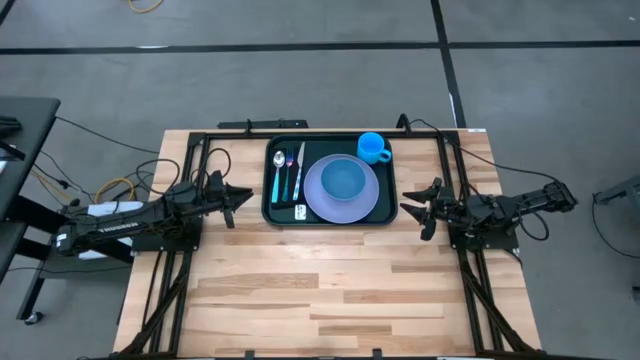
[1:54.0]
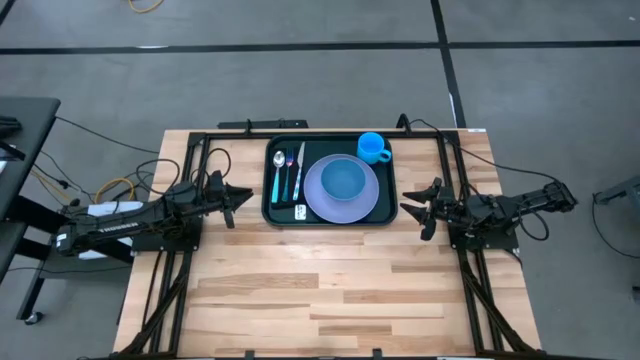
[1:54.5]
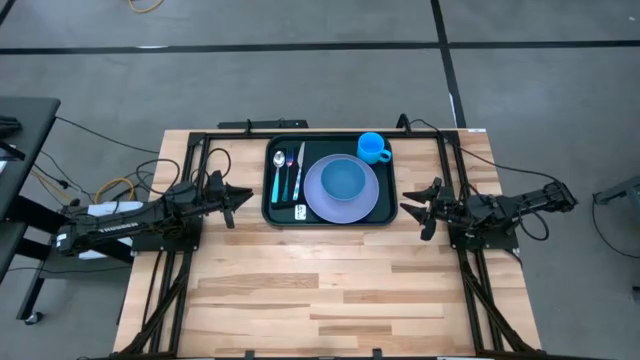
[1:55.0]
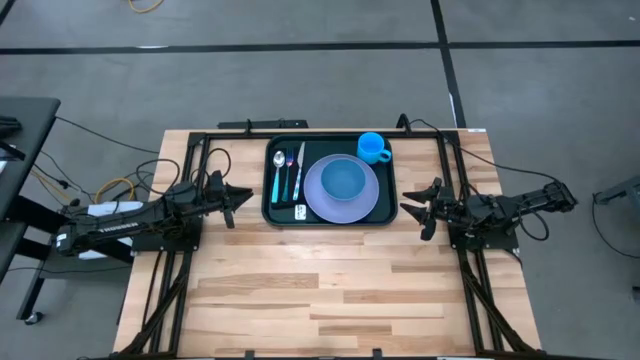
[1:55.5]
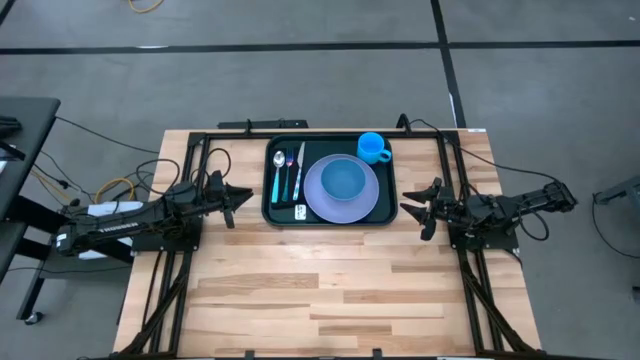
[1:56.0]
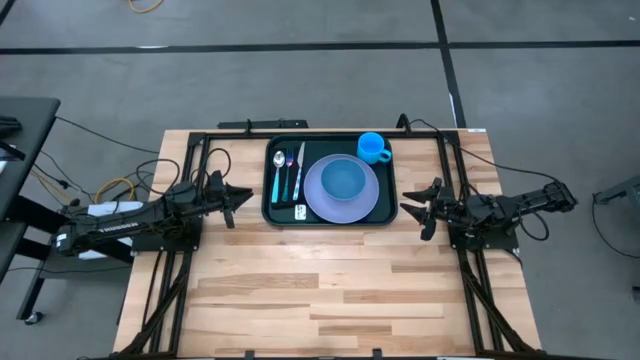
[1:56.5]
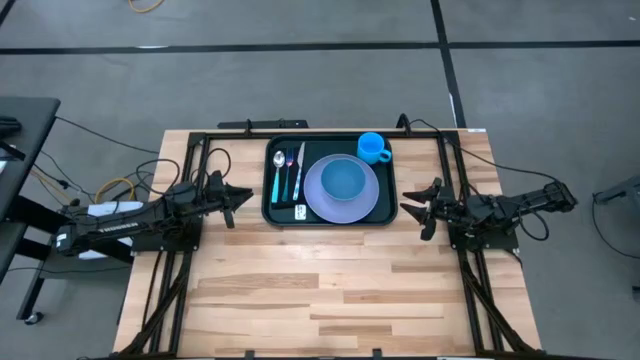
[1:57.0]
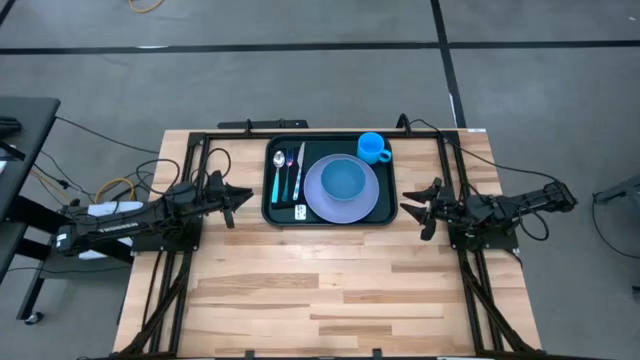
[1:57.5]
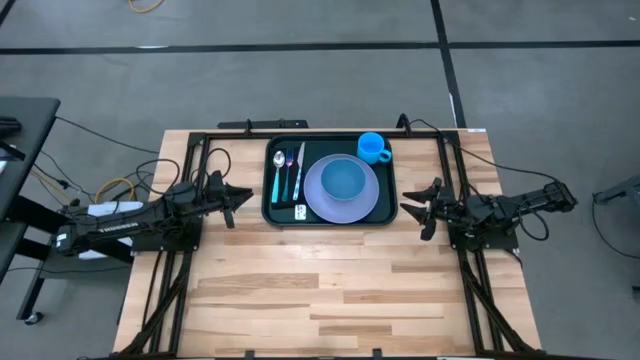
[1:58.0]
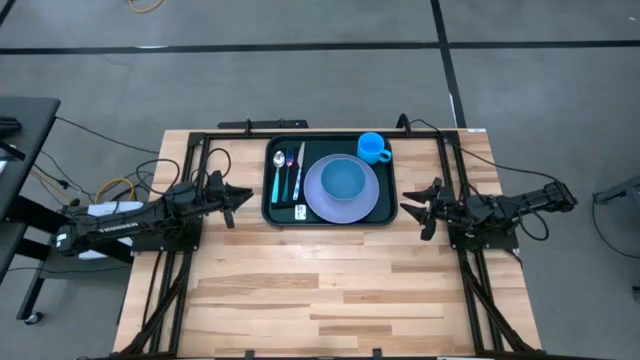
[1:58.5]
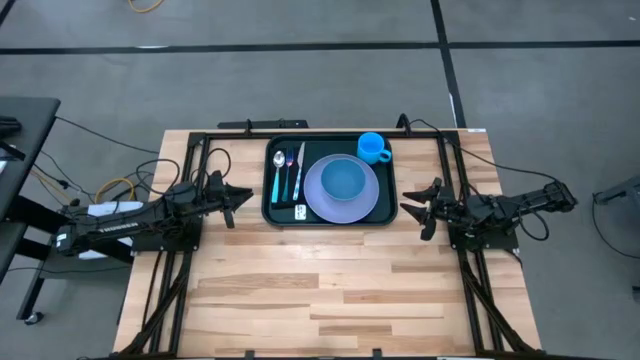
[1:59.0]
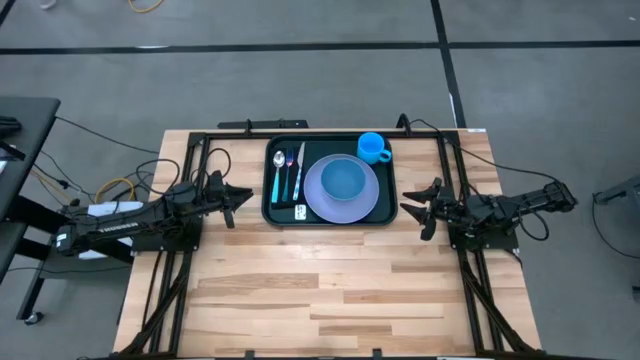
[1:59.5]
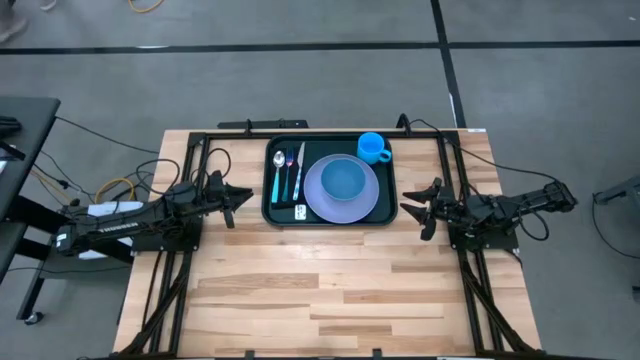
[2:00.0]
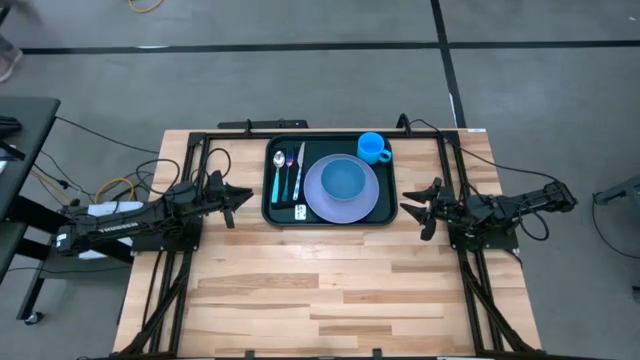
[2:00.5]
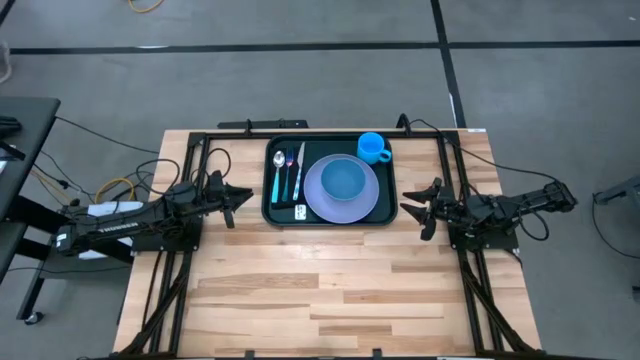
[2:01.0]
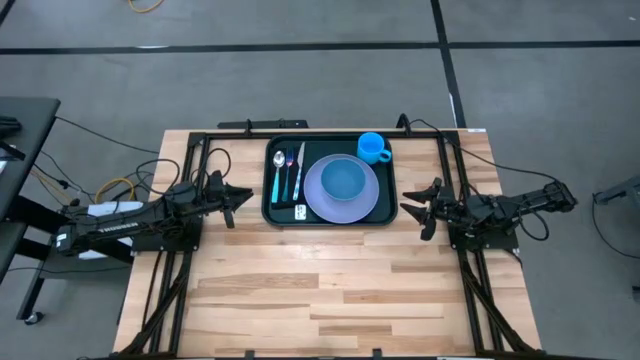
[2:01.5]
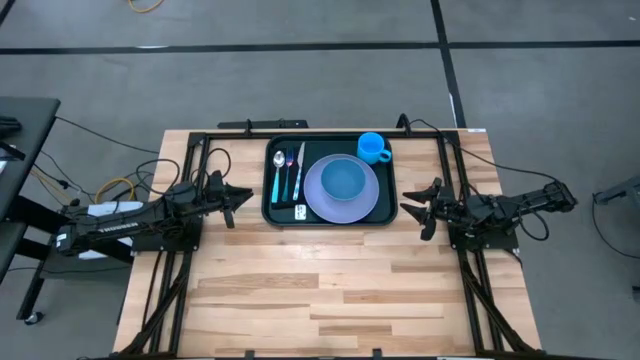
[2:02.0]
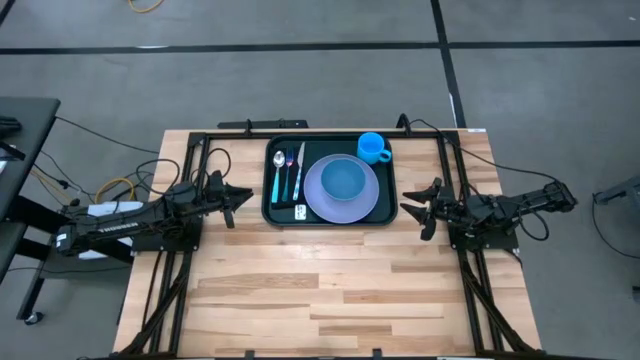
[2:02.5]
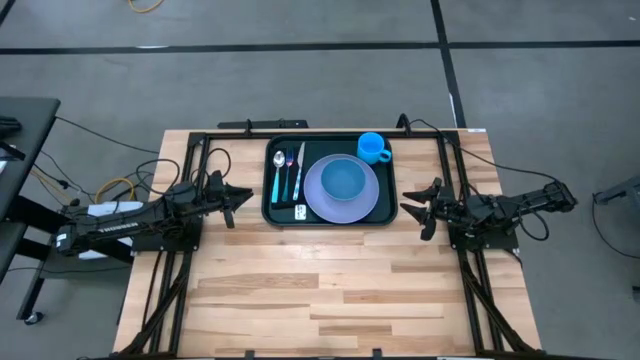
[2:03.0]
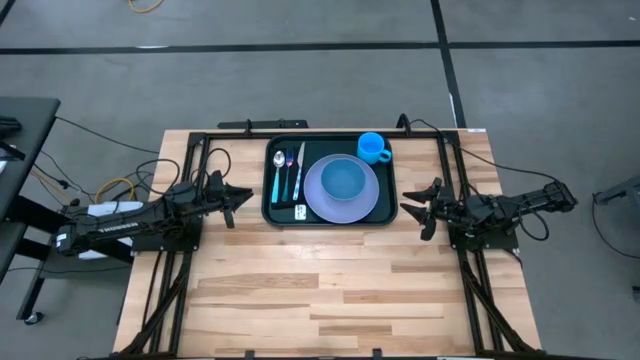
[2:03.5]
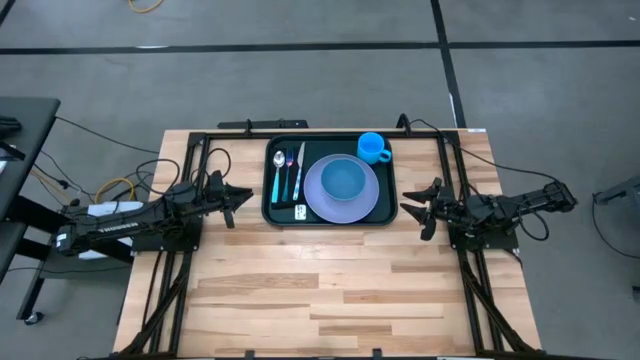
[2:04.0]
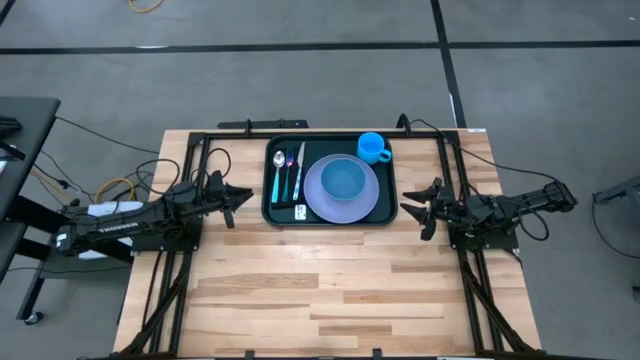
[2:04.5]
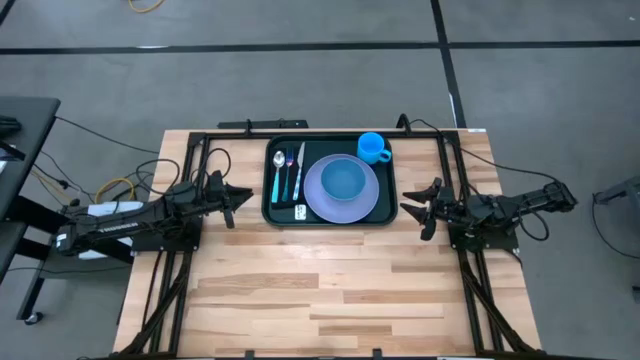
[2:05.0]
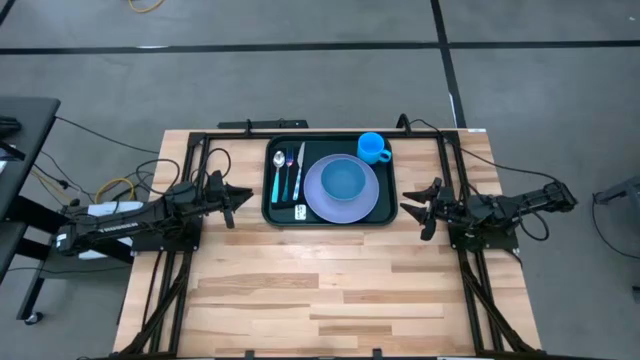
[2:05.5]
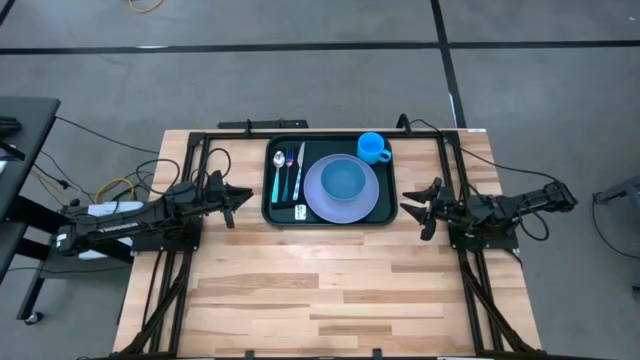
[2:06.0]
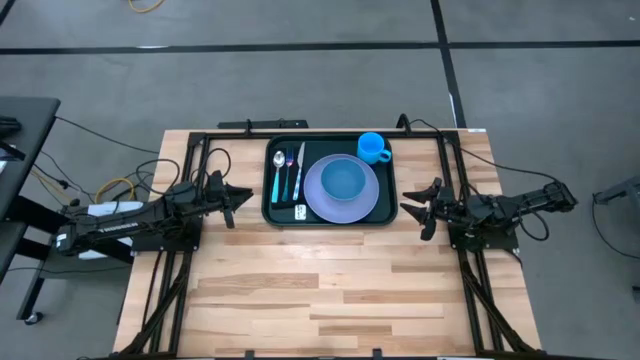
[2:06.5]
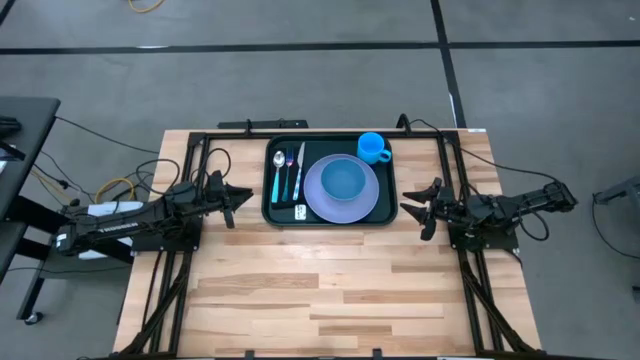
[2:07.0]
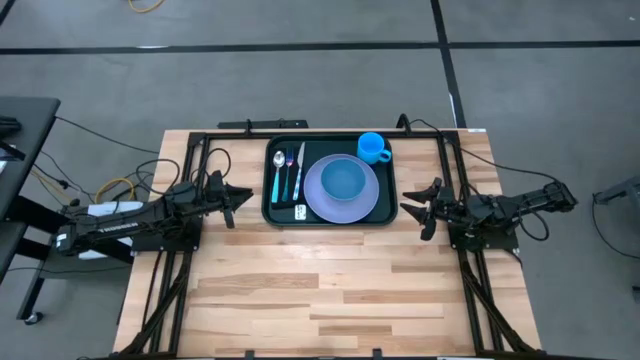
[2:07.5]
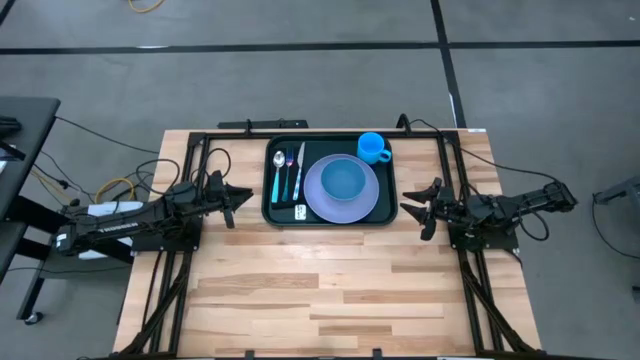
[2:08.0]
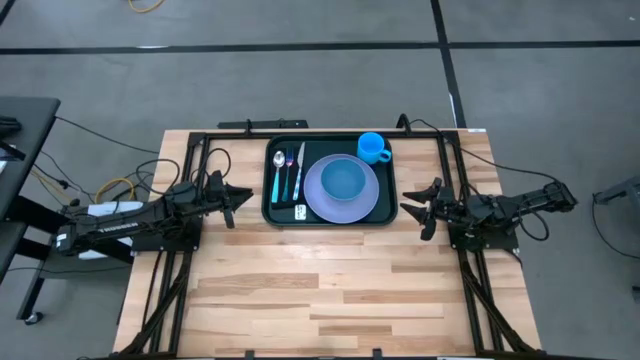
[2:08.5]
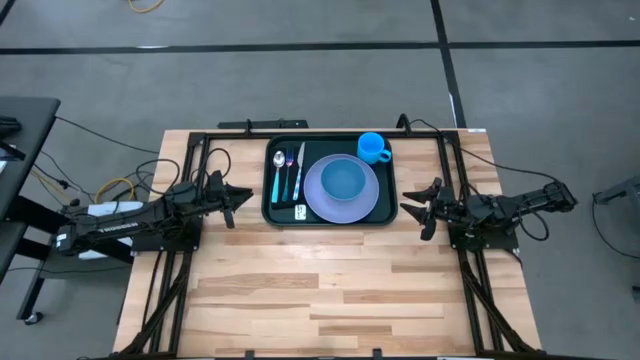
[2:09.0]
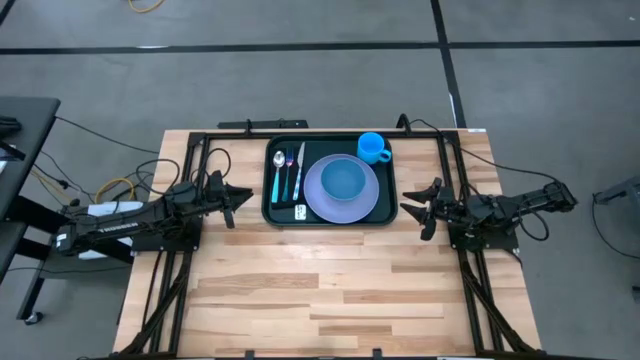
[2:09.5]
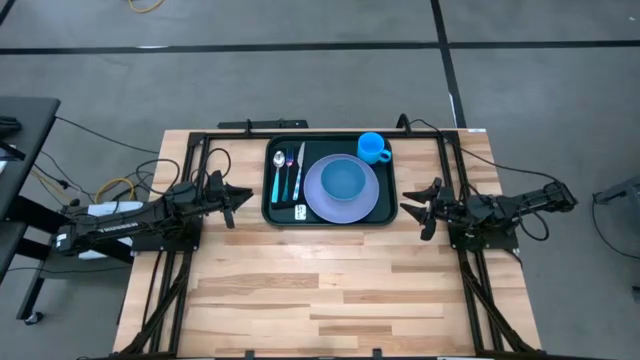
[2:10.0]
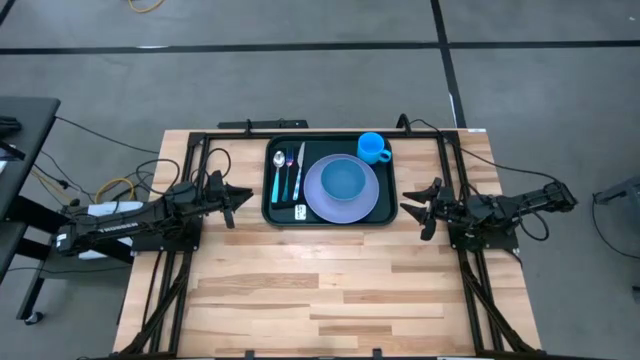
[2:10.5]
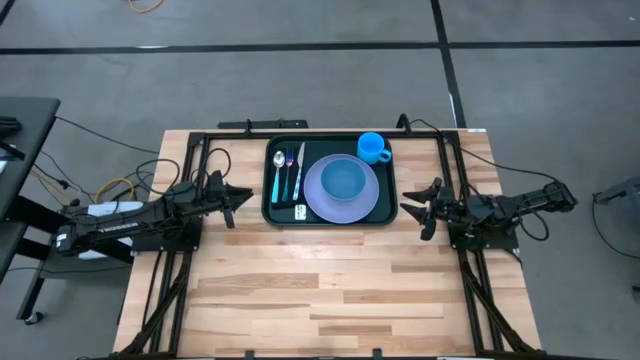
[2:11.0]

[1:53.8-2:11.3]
Task: Set up tray
Return to Home Position
